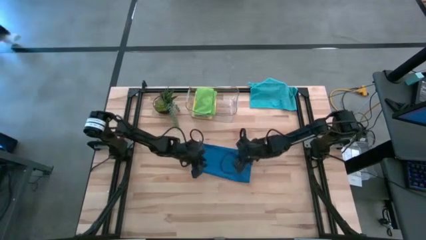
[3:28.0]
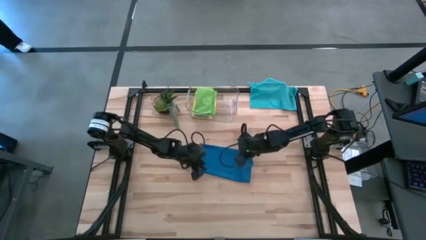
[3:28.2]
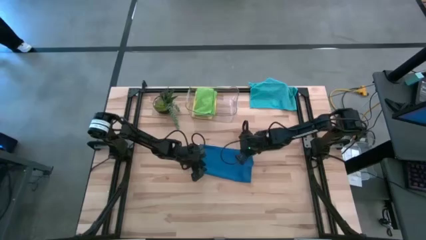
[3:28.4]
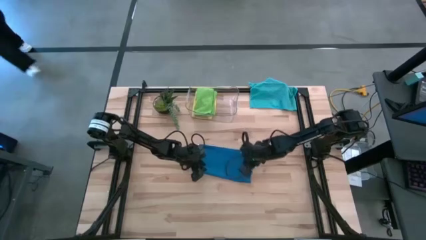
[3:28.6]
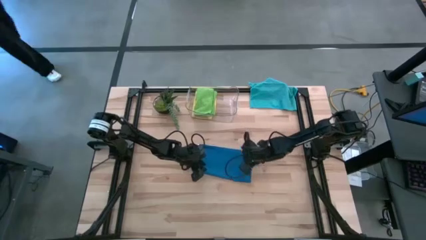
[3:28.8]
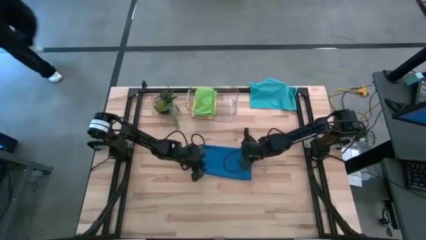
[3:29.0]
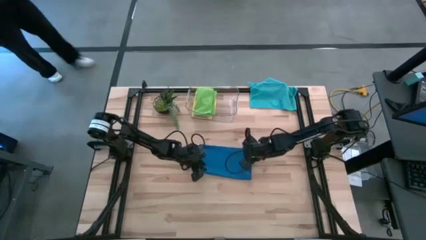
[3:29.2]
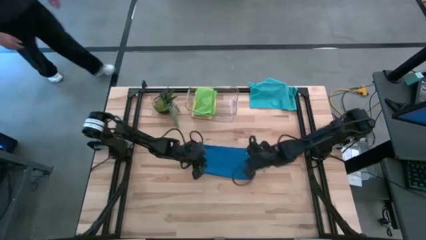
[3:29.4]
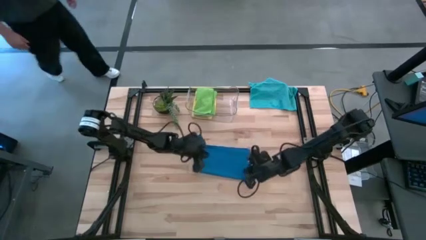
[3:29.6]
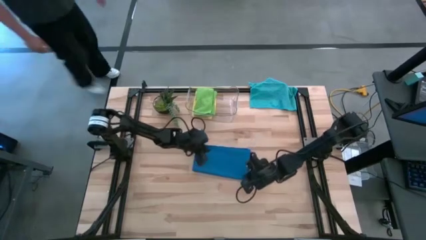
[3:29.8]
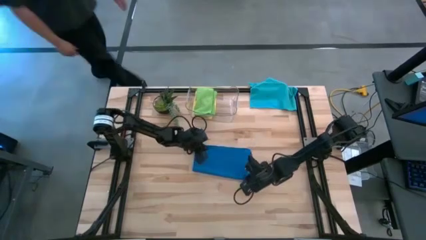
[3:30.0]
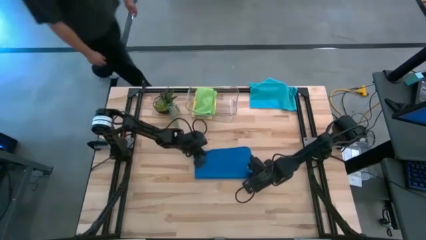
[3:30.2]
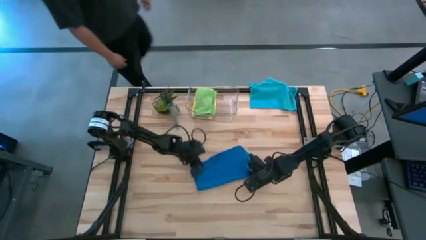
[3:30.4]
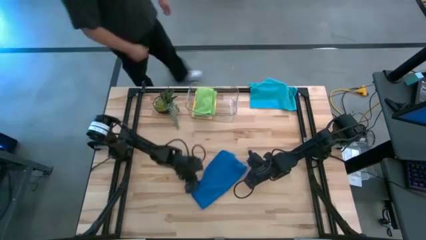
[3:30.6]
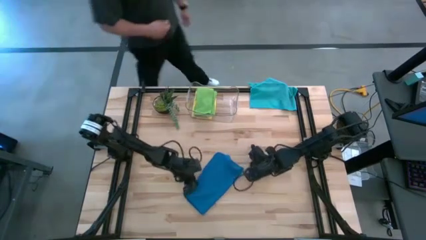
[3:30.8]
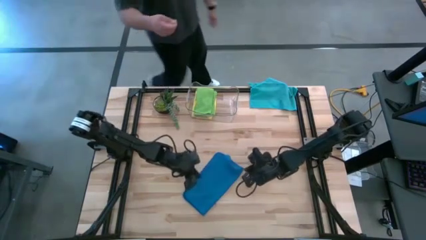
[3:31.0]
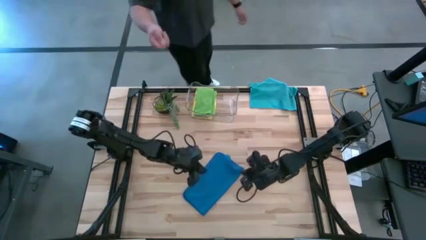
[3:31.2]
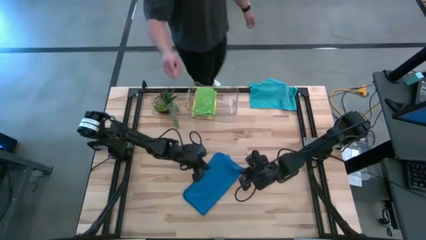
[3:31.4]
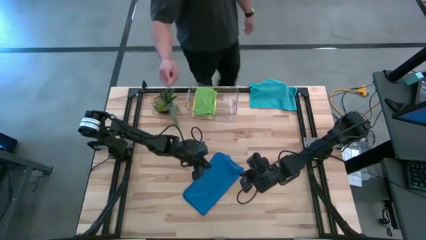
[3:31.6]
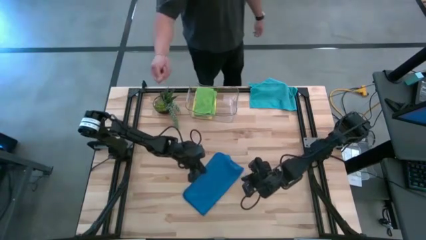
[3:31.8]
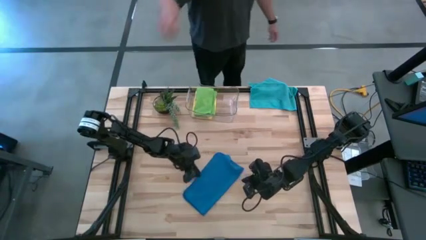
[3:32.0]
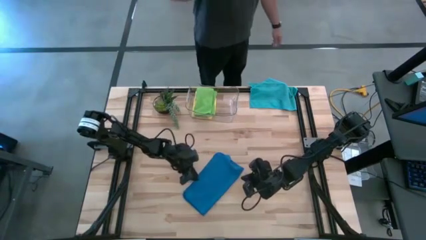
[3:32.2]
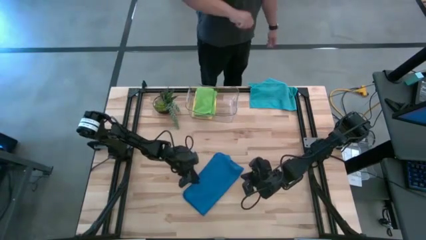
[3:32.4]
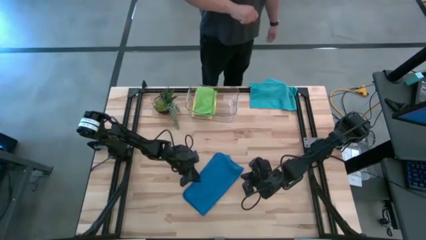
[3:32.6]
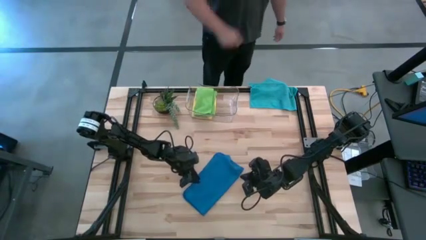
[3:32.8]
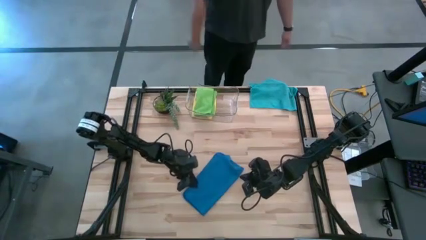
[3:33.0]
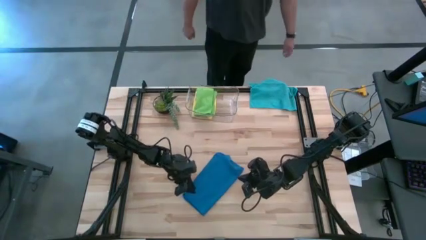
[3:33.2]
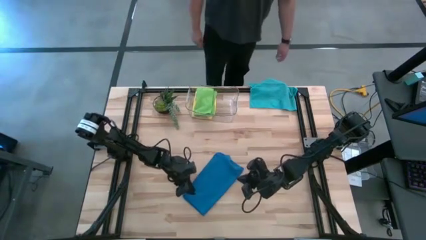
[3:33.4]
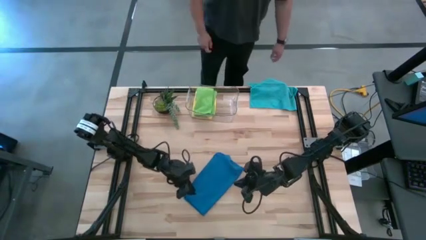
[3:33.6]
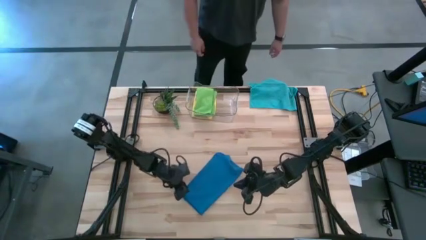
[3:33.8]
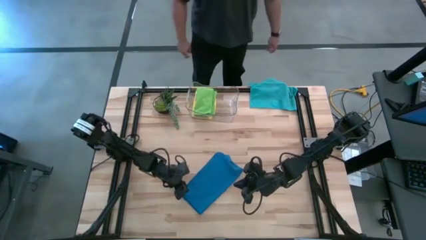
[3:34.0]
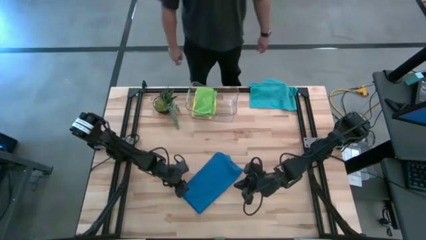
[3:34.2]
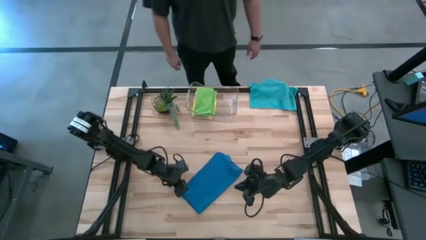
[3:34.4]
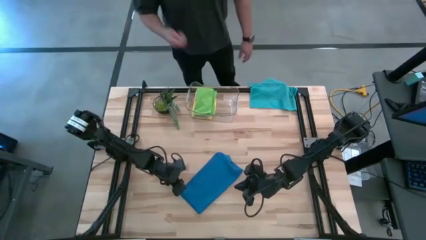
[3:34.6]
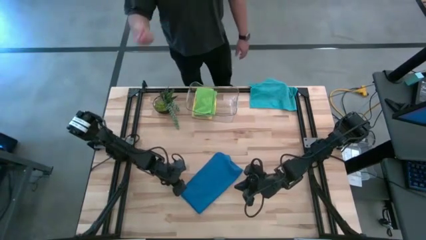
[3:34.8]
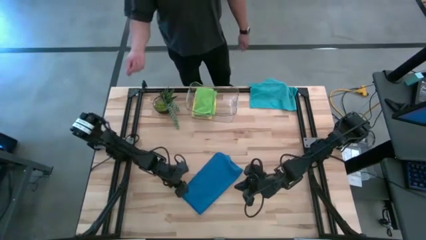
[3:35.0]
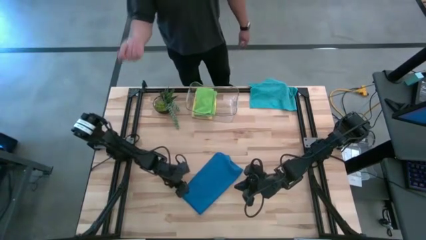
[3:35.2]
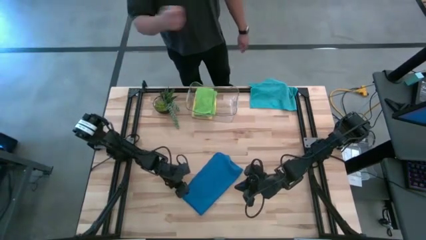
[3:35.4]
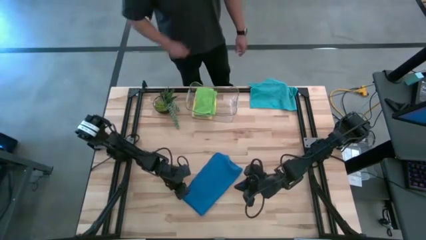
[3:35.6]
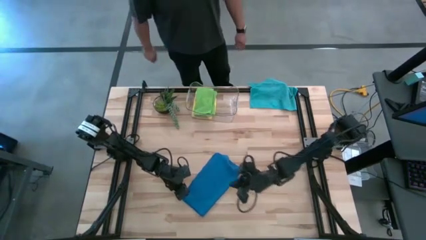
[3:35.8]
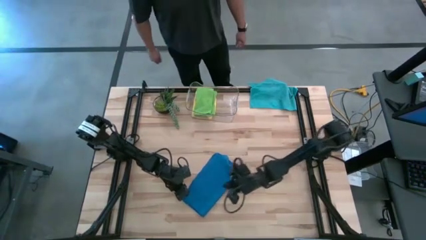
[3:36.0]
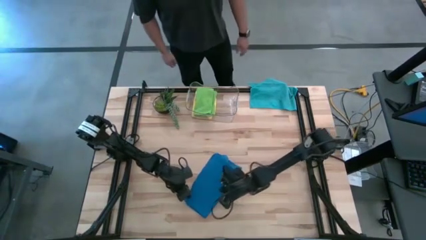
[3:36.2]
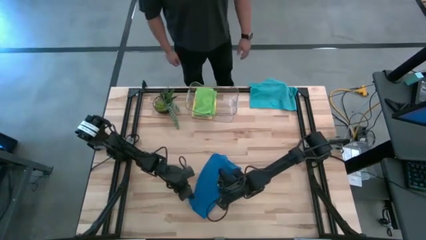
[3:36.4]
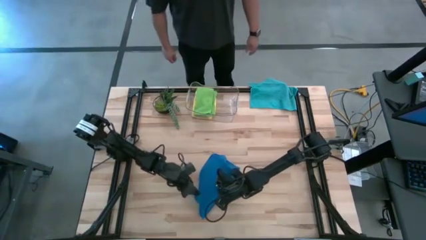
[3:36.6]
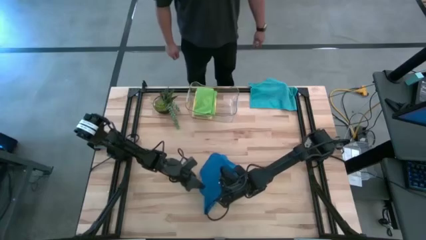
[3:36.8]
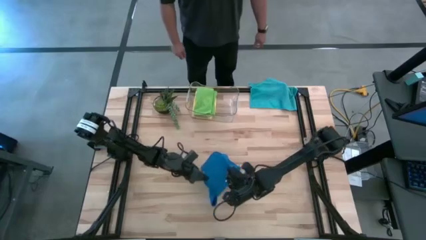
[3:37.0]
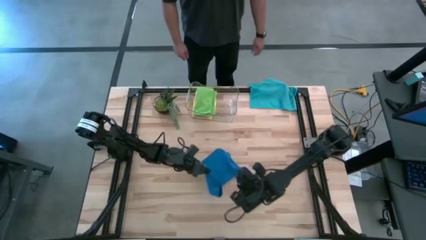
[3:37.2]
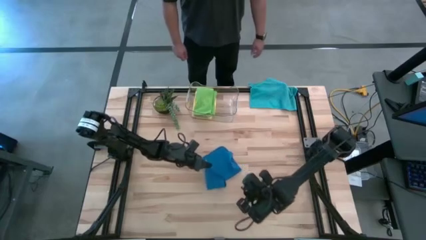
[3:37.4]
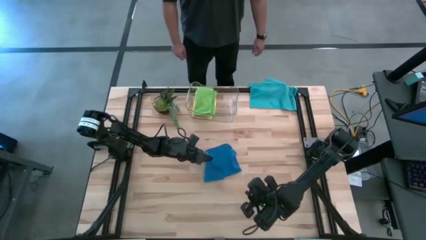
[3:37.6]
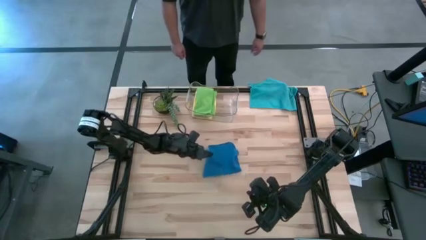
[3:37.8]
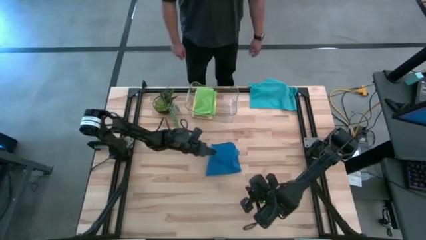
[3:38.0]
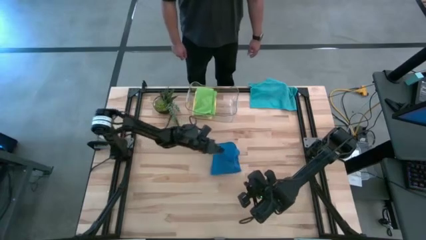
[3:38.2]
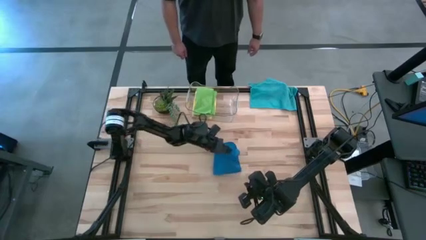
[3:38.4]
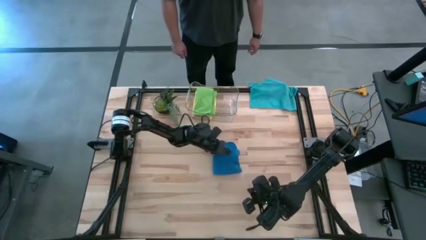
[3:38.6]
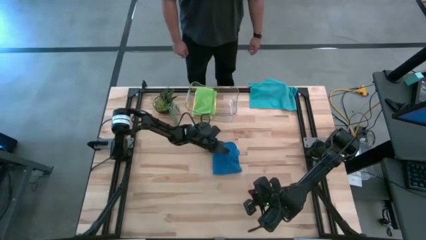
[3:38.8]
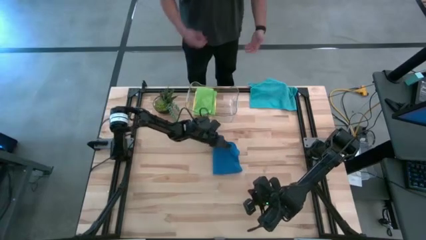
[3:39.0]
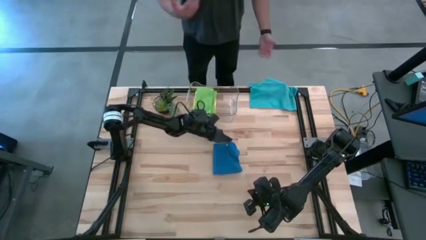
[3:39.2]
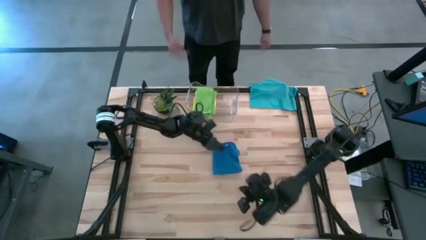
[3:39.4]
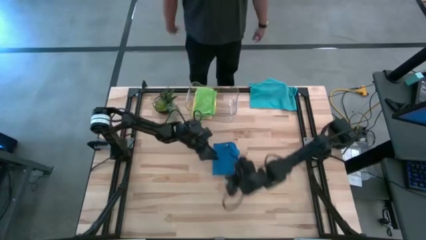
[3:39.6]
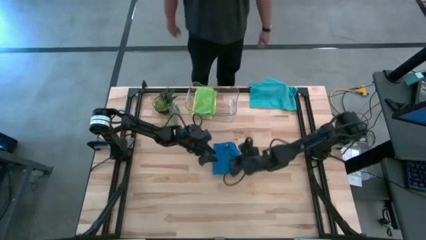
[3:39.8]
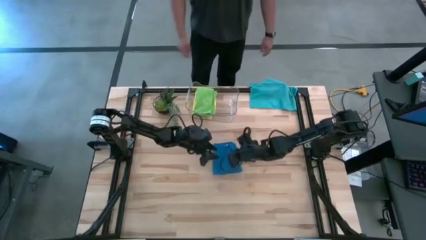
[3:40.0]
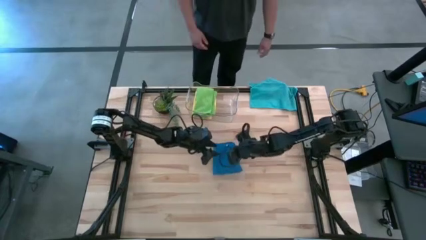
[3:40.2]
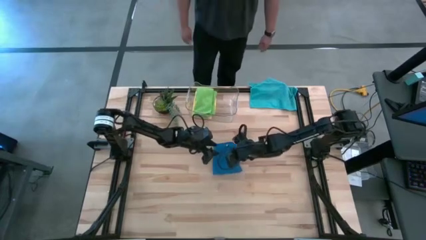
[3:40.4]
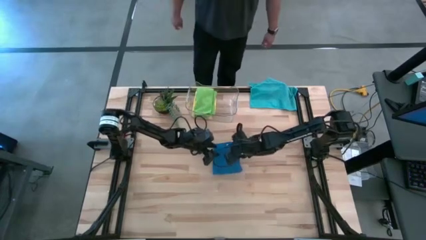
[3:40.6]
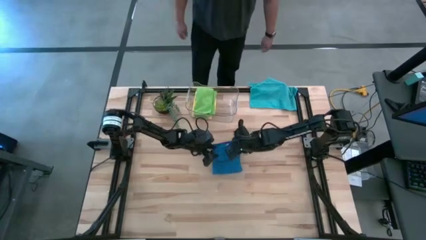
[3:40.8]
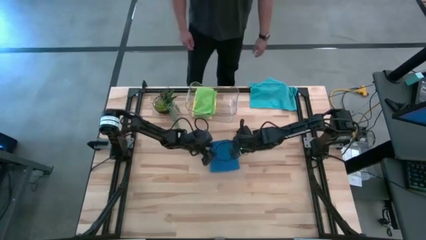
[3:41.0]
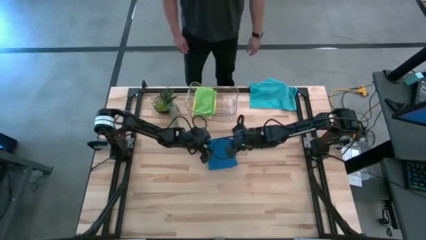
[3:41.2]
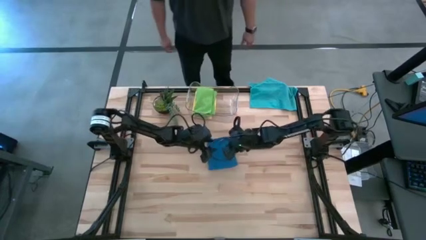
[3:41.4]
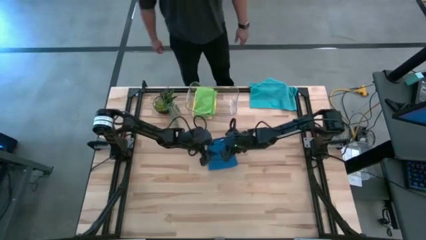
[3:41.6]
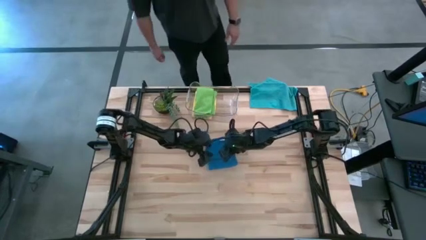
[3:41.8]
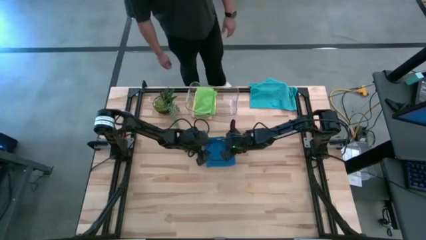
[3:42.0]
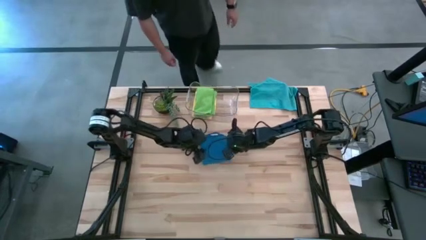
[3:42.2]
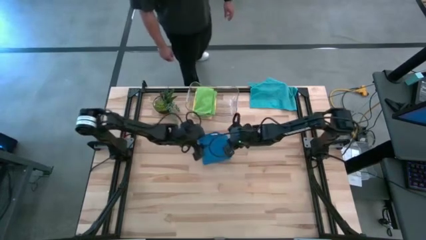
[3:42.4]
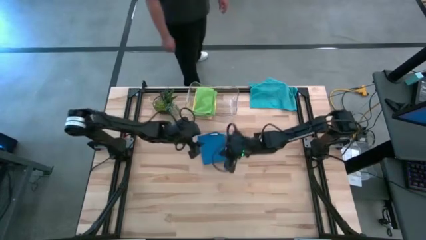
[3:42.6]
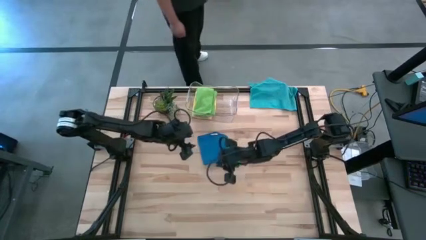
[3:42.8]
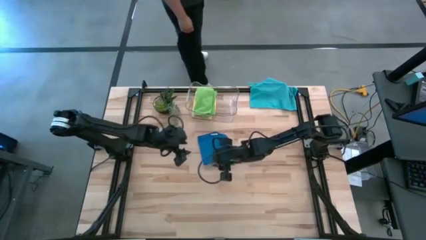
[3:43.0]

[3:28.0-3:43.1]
Task: Fold microfiber towels
Fold the bottom blue towel

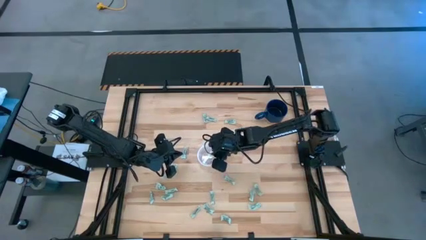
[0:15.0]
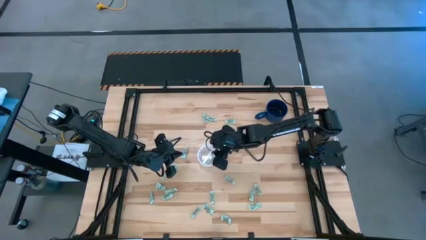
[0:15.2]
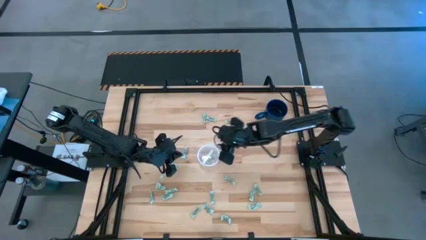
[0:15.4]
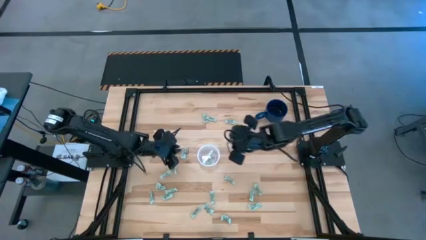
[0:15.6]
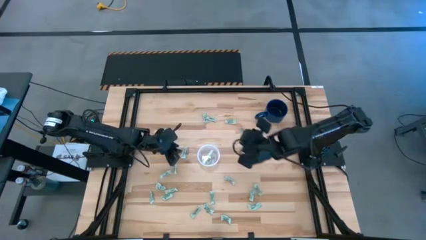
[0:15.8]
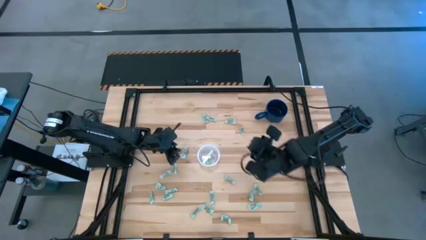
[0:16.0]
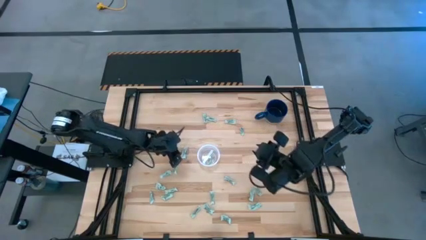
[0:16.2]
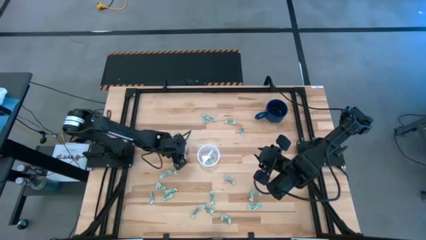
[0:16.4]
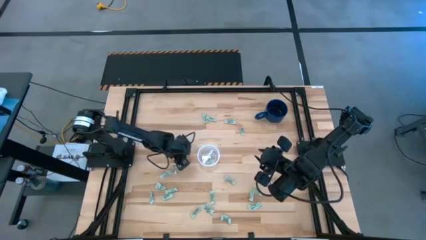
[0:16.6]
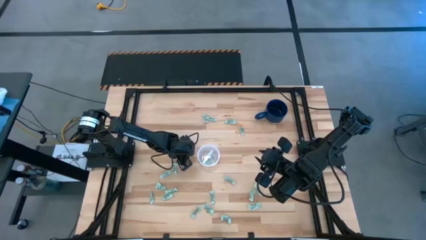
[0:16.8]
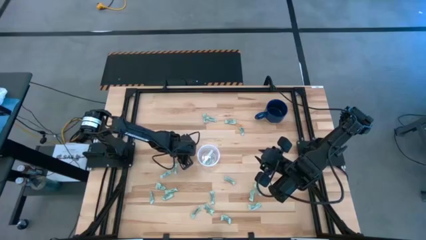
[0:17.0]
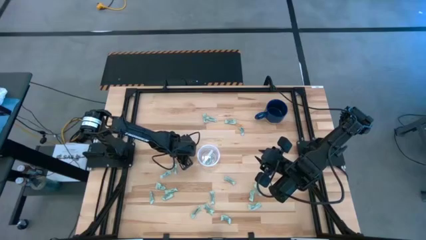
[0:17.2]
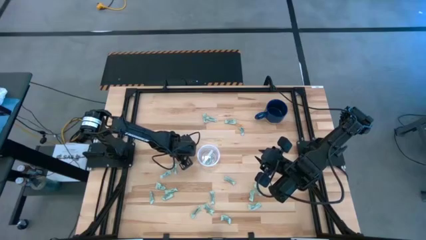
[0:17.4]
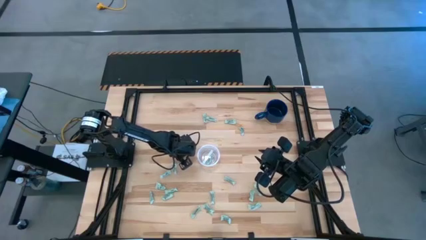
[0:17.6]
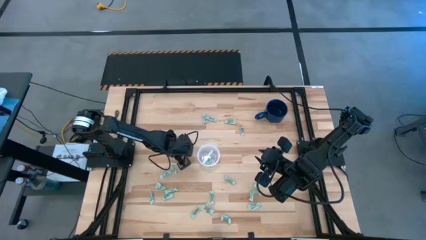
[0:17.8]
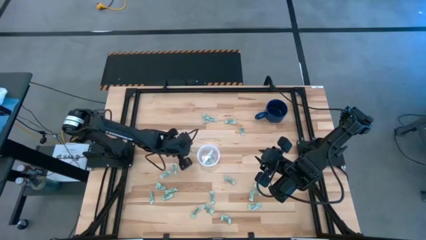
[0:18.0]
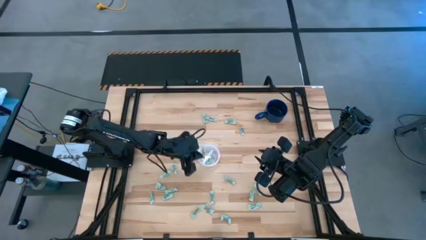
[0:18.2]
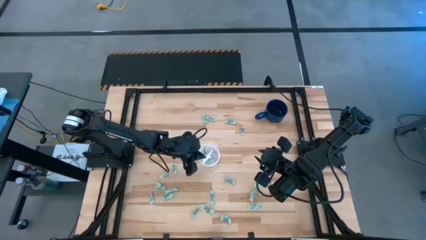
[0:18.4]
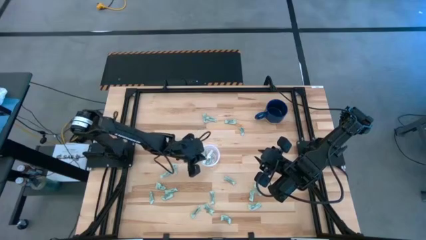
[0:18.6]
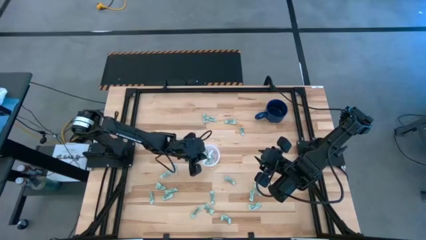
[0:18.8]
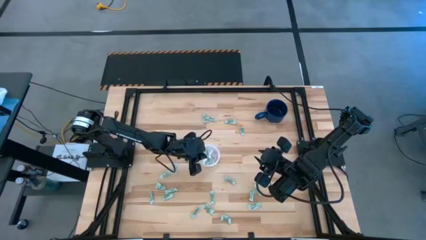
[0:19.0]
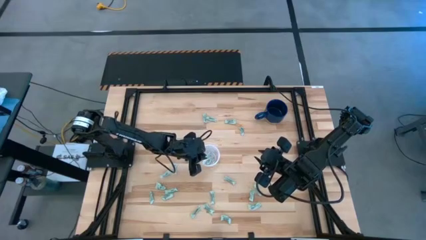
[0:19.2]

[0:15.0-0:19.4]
Task: Pick and place items into bin
Put the stevia packet into the transparent bin
